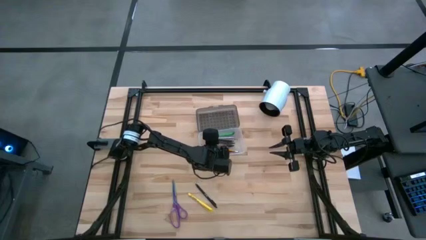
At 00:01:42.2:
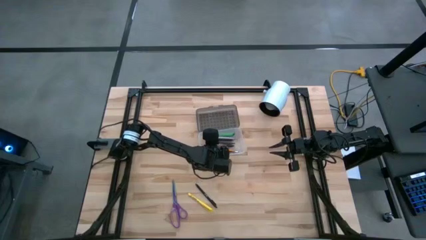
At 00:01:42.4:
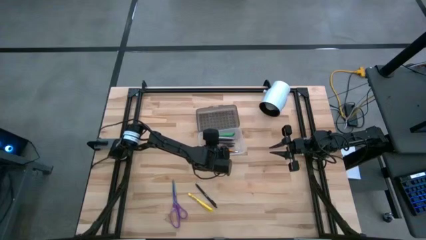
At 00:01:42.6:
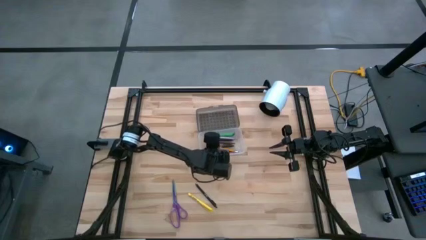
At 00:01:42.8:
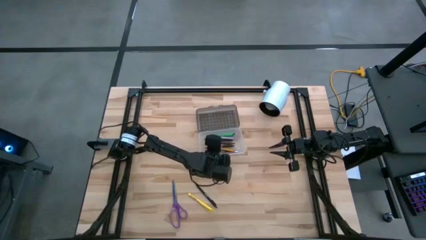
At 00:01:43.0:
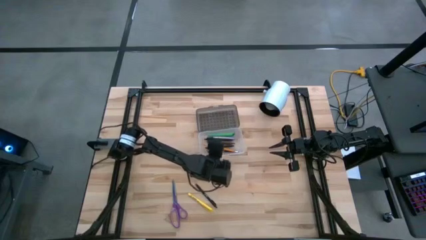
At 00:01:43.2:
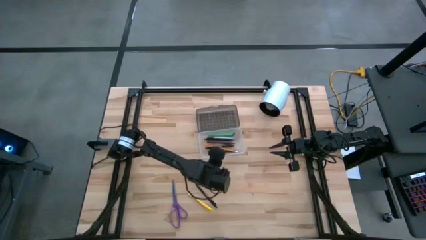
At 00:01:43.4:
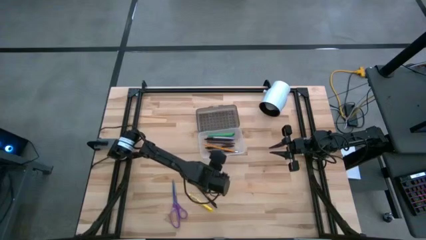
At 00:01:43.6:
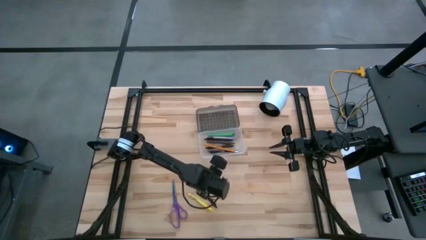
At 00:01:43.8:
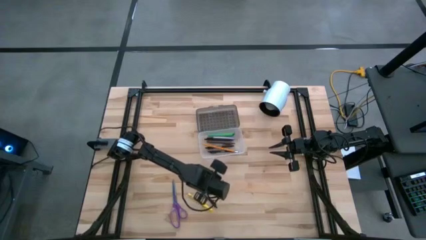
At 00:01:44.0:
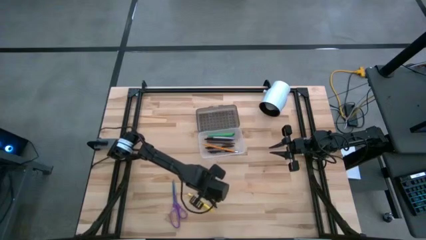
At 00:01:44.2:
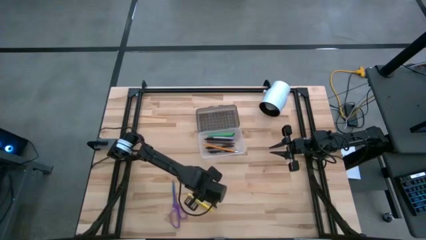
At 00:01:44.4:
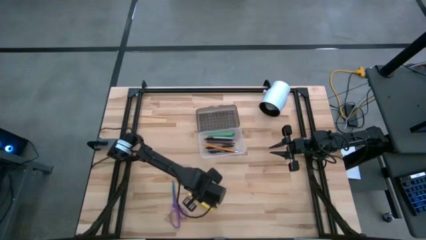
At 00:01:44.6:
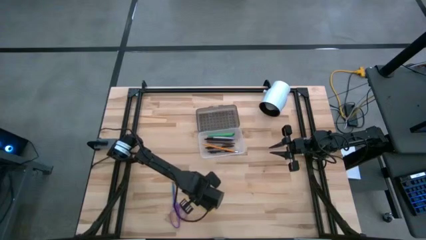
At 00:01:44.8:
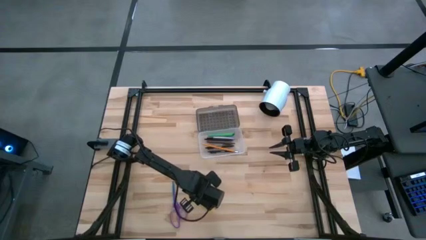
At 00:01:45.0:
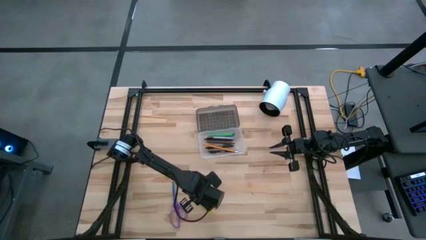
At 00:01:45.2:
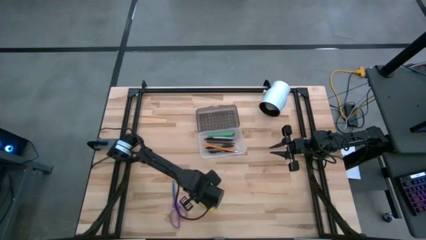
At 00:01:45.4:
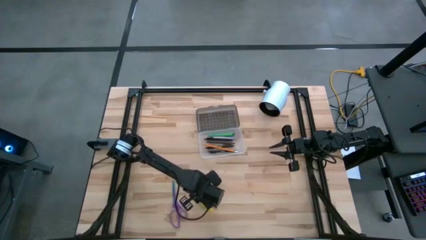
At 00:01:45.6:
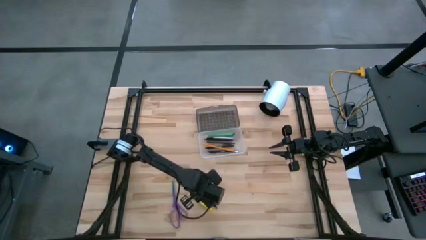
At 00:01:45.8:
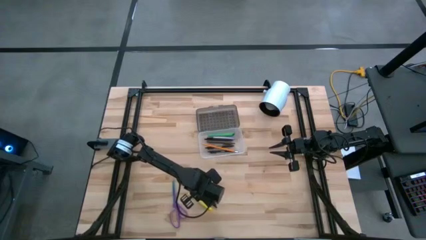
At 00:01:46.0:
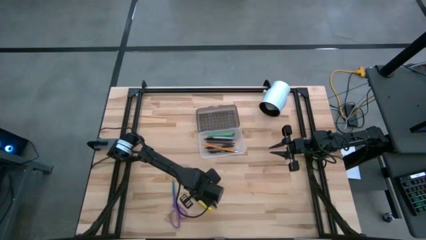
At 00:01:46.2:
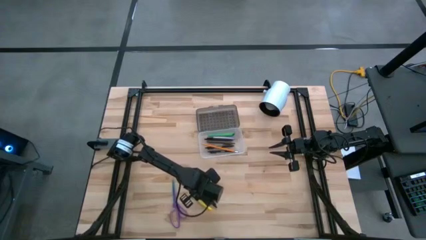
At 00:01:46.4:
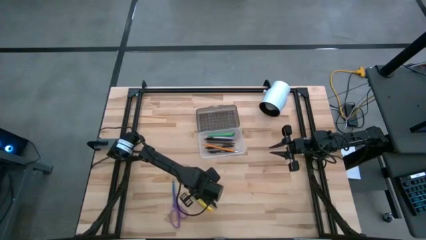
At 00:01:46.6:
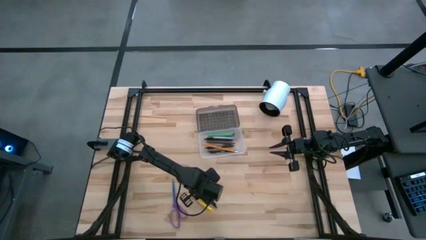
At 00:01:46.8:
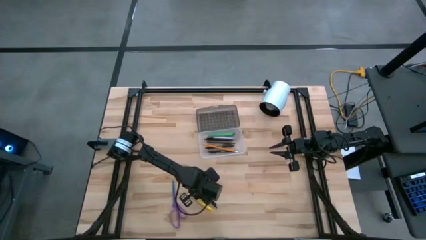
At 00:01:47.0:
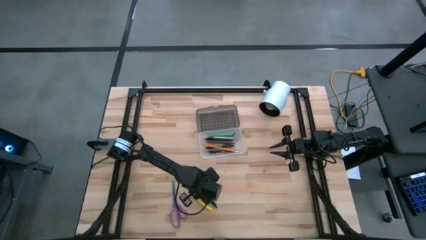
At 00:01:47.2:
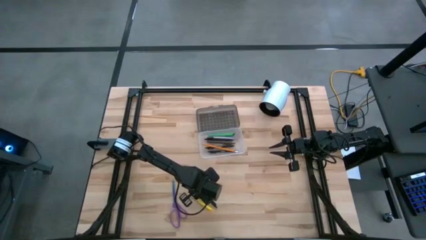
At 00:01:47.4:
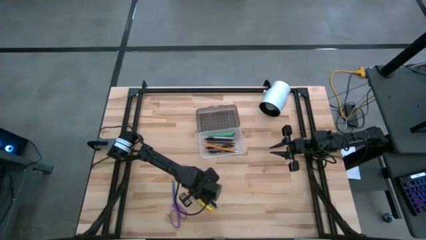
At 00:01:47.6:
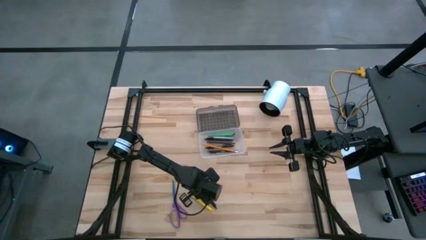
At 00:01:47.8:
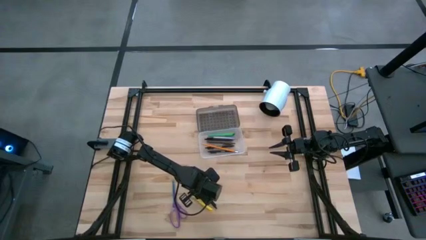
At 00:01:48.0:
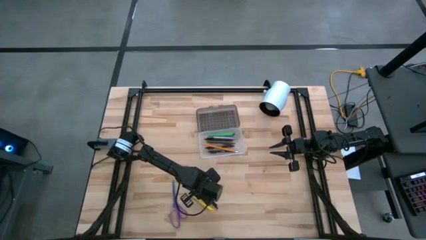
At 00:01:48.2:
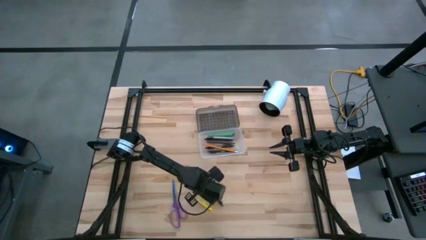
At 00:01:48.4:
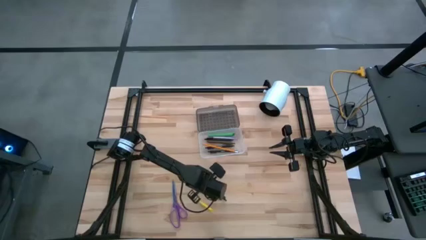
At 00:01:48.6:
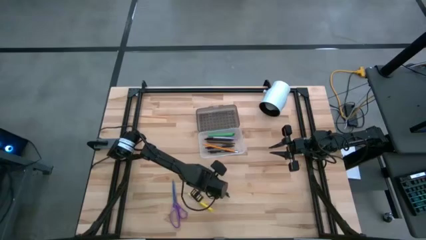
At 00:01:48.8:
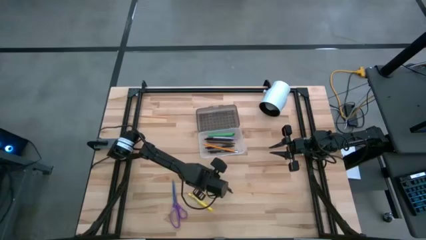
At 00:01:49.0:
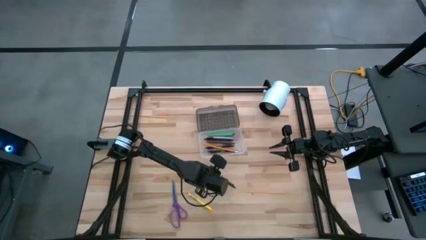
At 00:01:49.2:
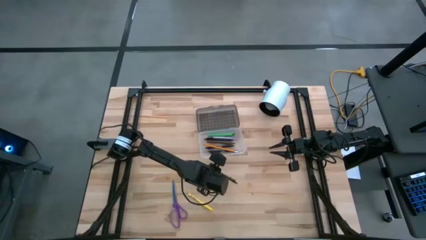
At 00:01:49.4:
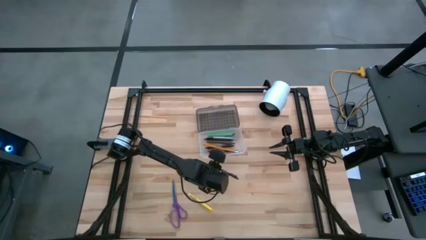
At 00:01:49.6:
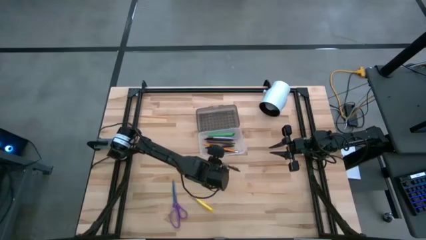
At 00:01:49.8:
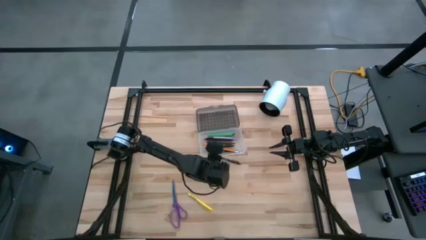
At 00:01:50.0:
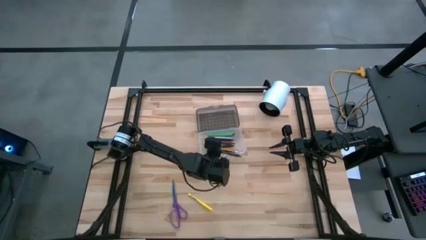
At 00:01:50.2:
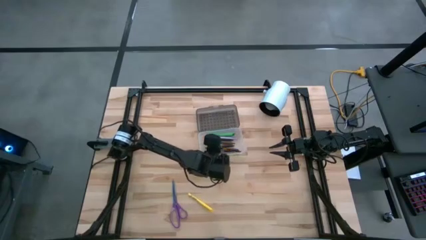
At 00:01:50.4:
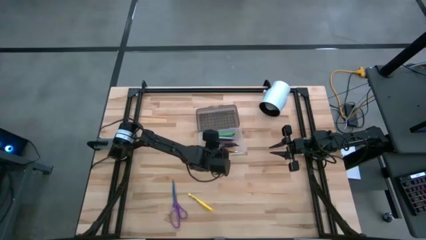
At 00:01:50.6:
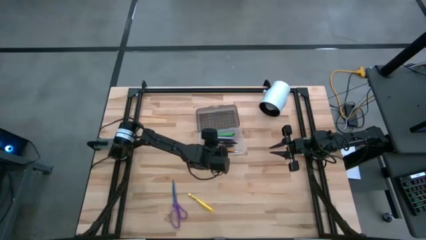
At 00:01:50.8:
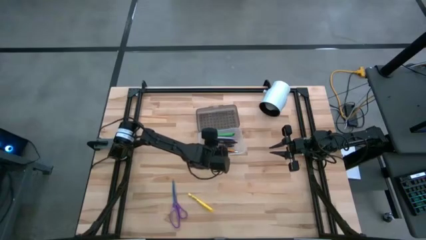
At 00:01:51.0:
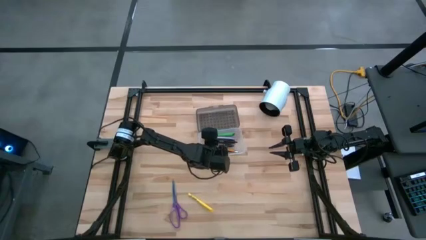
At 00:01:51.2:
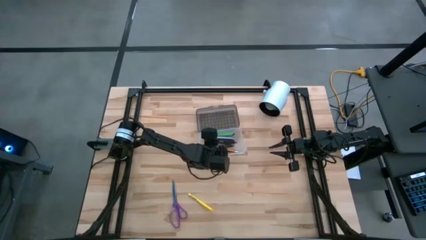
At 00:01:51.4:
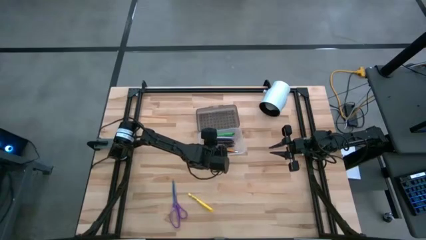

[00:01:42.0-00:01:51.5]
Task: Pick & place school supplies into a supply box
Put the black pen into the transparent supply box

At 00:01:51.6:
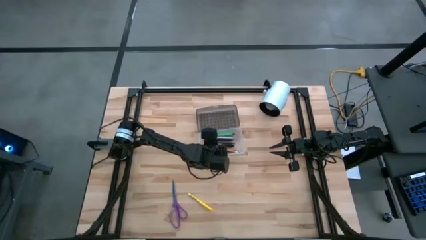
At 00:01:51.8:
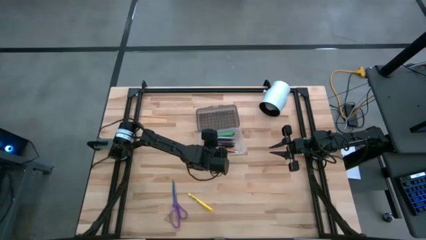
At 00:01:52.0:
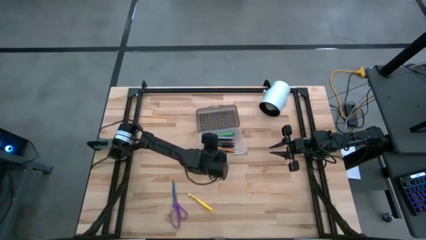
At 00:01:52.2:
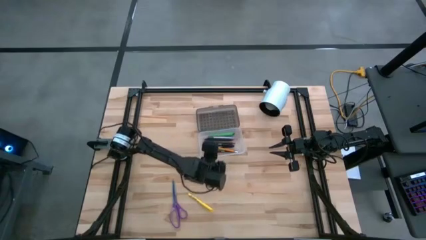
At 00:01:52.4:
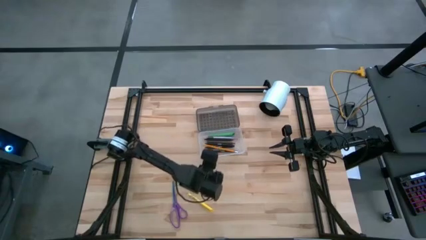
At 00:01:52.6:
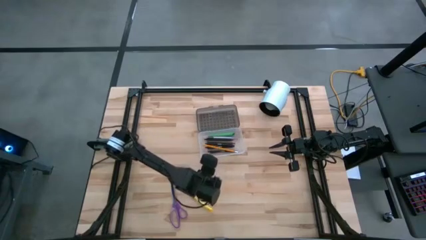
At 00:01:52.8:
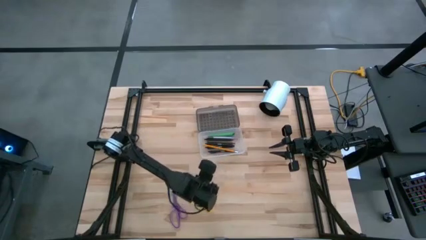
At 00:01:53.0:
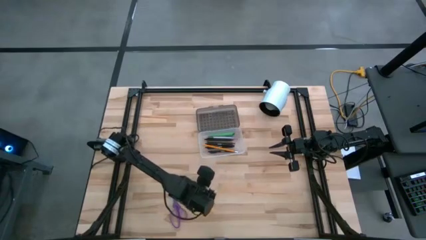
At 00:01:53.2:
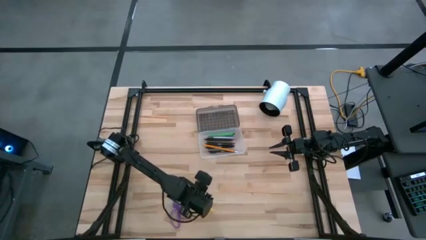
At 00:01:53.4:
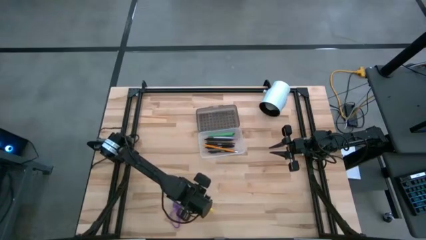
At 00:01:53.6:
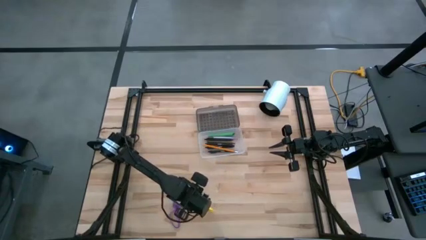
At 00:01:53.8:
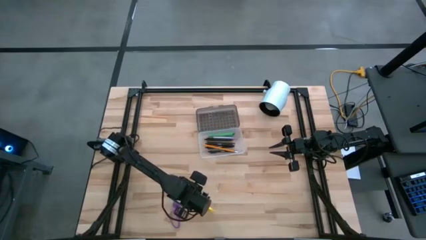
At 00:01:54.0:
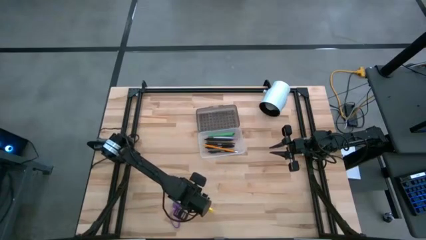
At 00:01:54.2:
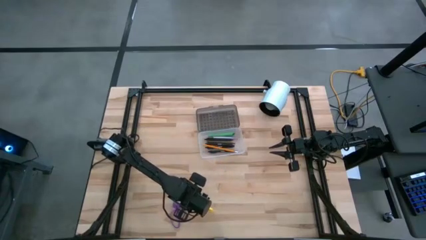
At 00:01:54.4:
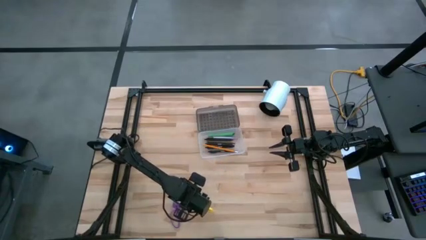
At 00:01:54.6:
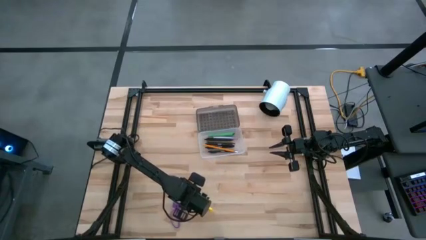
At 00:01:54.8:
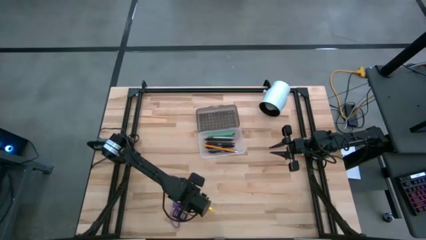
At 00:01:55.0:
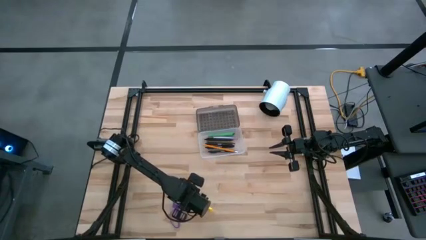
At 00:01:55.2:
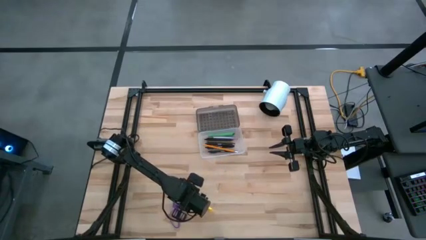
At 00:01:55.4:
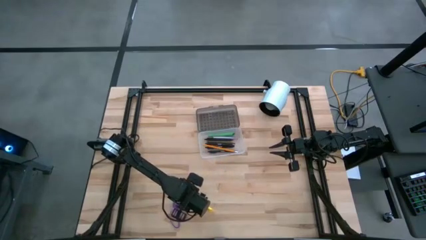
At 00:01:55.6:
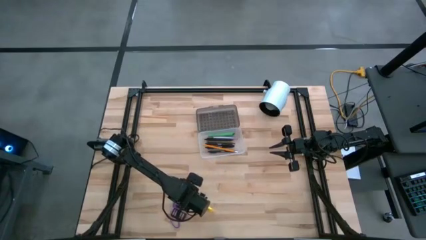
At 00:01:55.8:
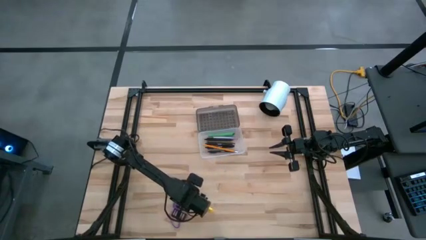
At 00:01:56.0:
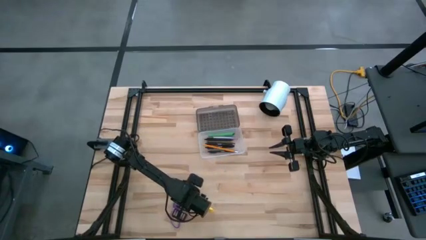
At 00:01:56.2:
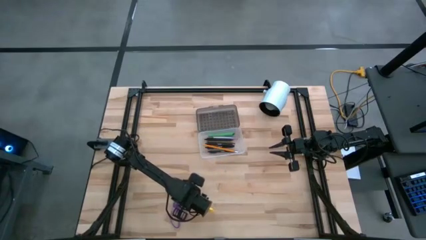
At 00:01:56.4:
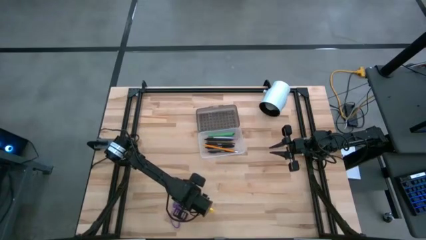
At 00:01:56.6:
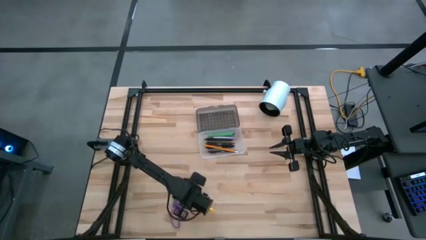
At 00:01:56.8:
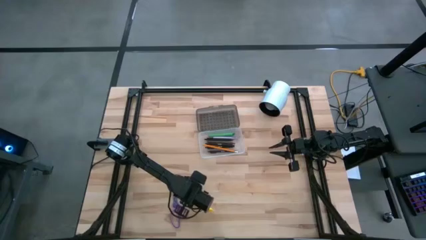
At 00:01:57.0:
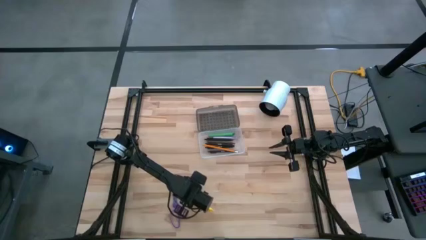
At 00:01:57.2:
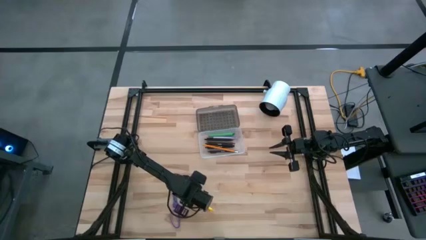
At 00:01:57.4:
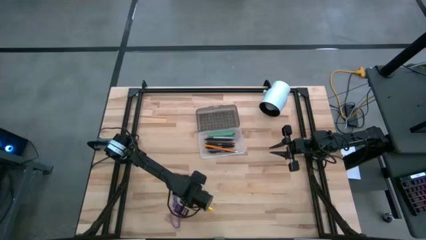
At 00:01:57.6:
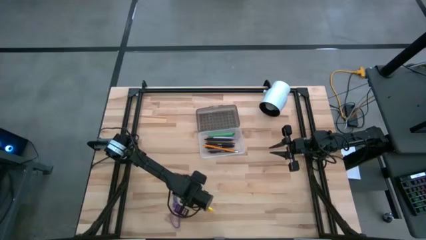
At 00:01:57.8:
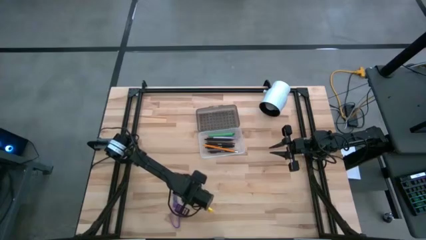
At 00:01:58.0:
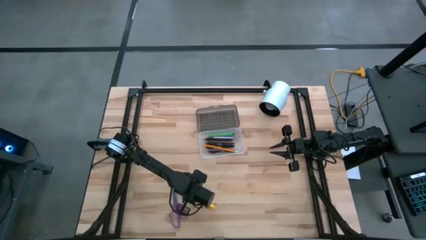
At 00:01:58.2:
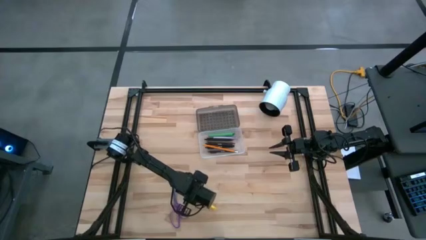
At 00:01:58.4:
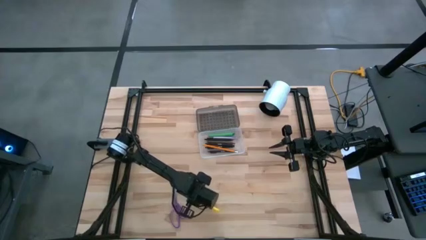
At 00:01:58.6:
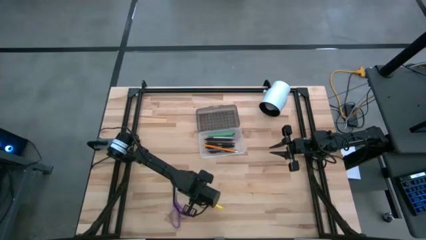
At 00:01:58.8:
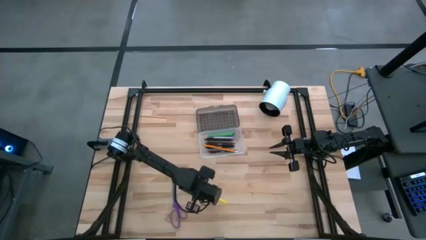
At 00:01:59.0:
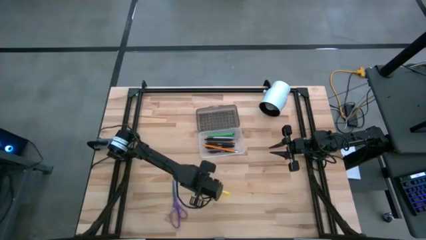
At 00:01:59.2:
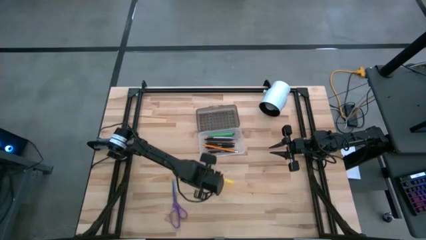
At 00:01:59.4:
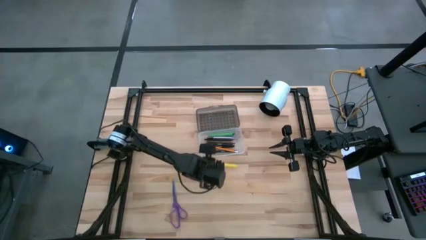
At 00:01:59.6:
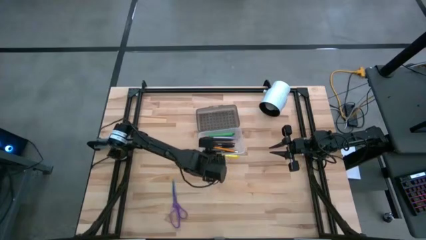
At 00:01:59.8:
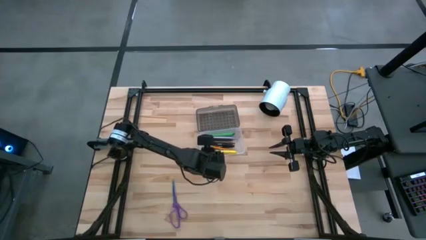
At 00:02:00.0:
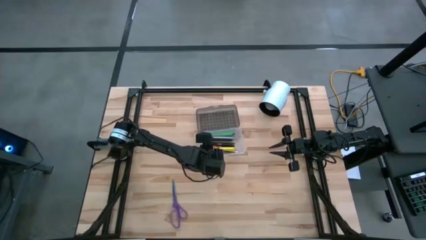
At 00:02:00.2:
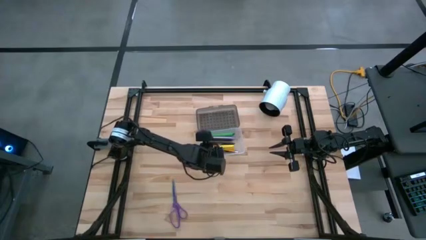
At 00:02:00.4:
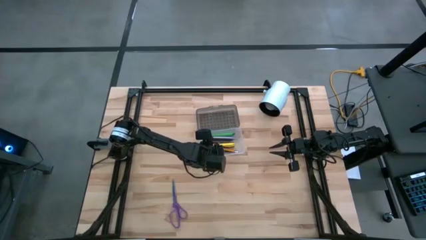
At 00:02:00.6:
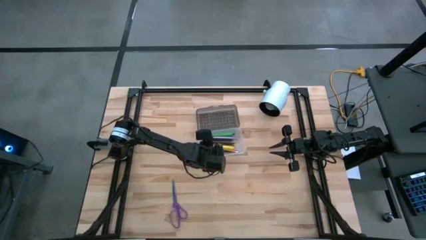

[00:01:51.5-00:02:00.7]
Put the yellow marker into the transparent supply box
